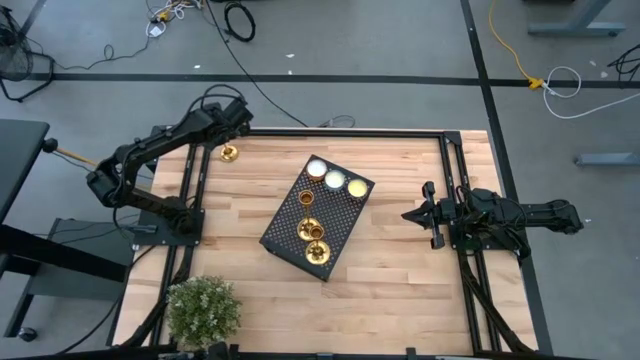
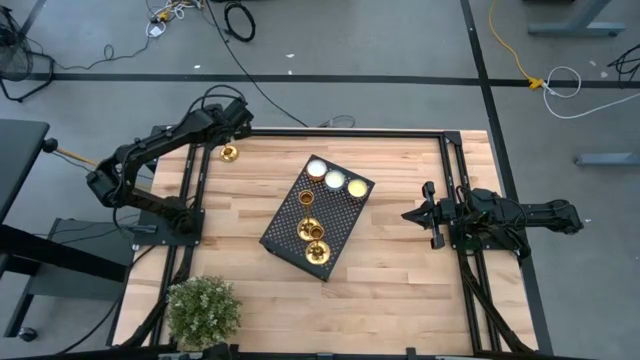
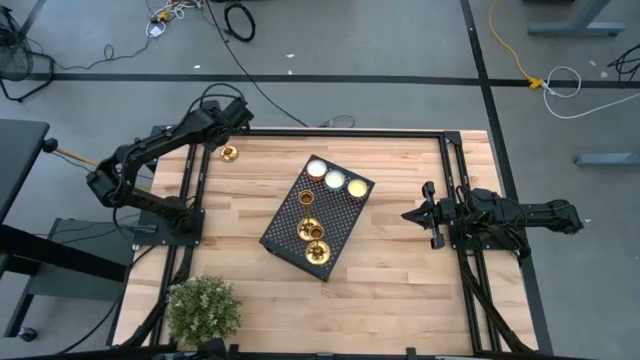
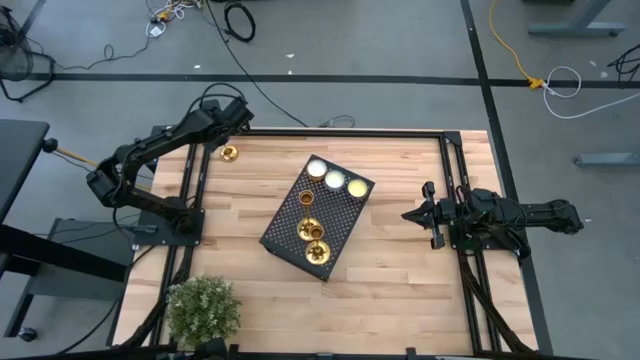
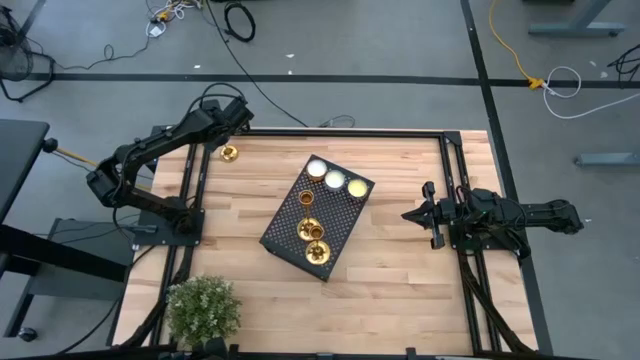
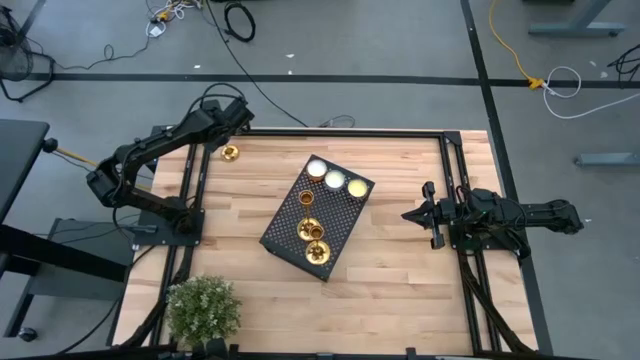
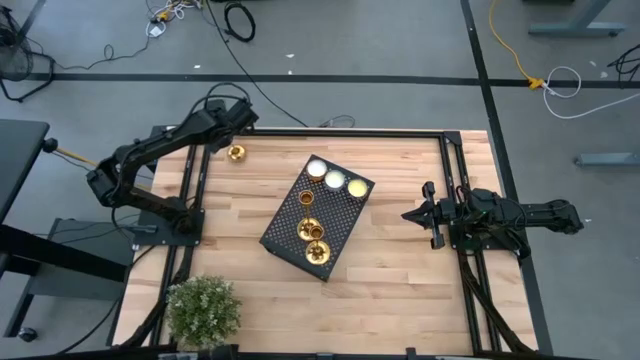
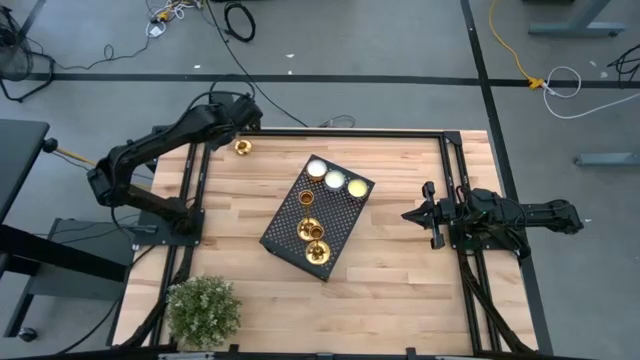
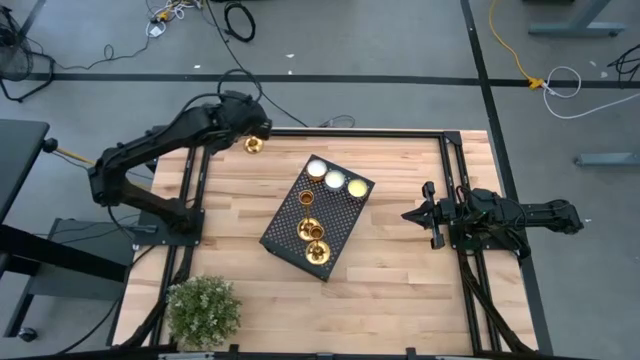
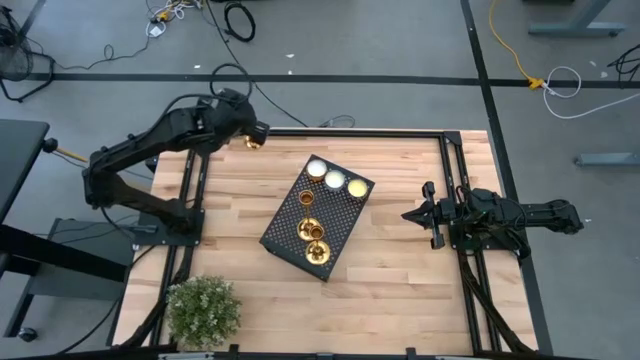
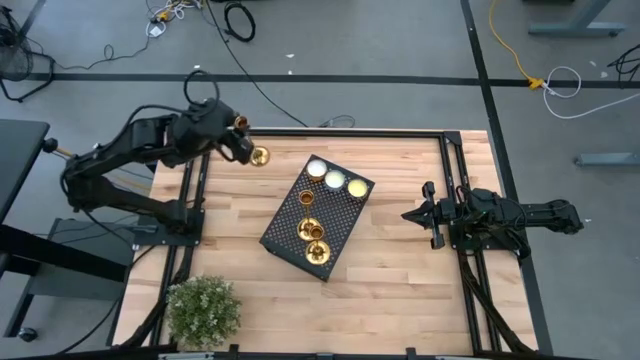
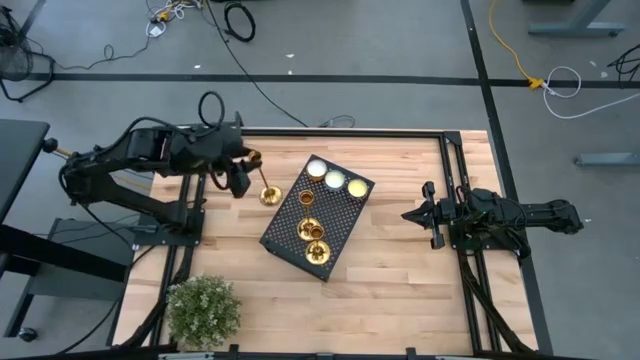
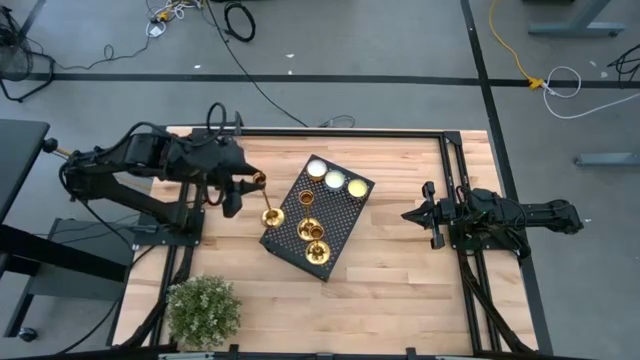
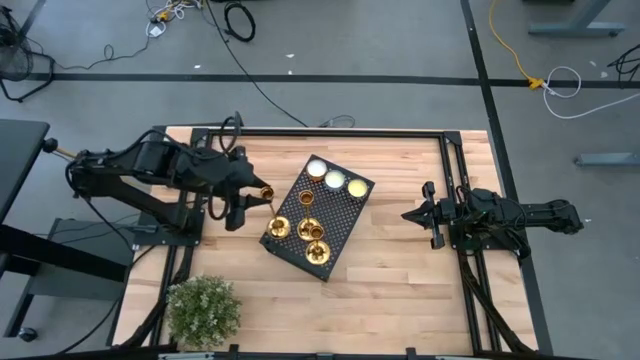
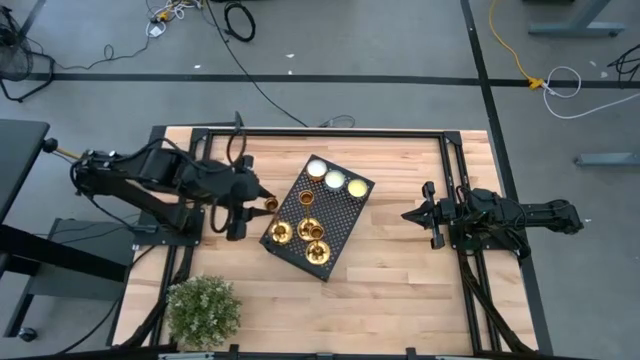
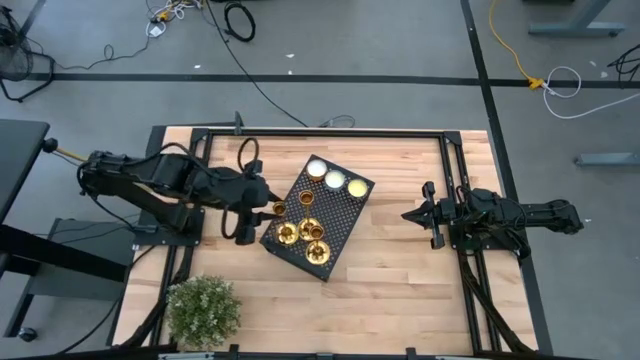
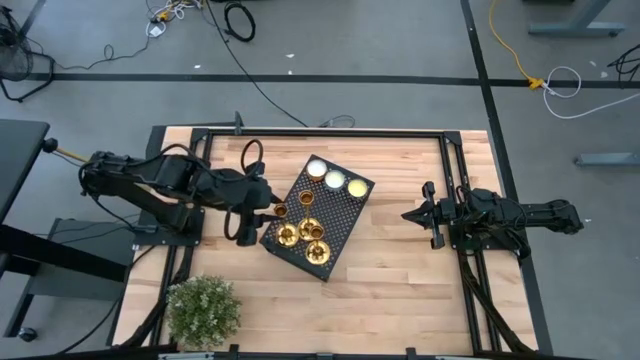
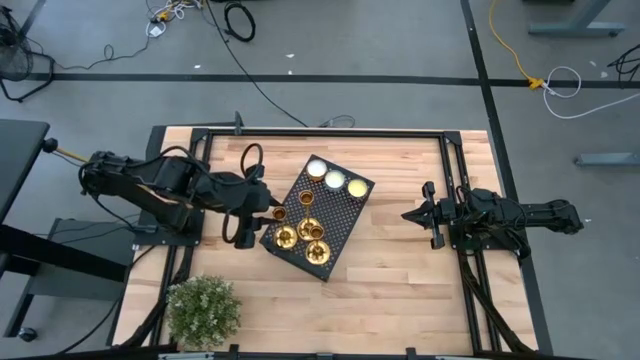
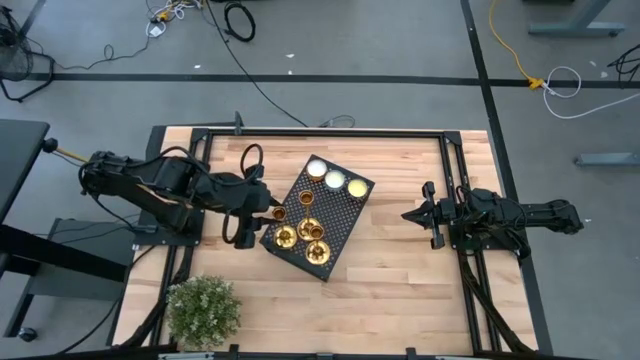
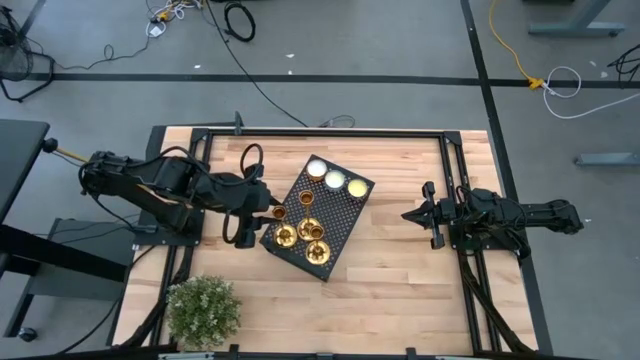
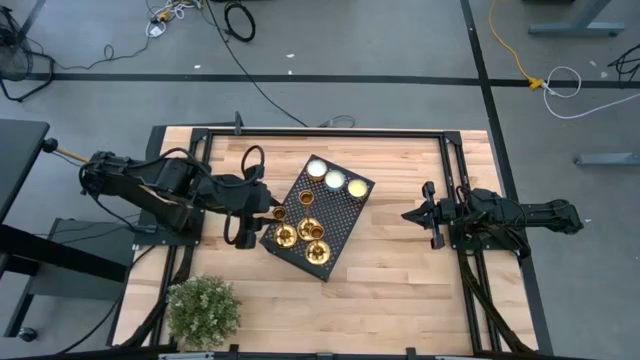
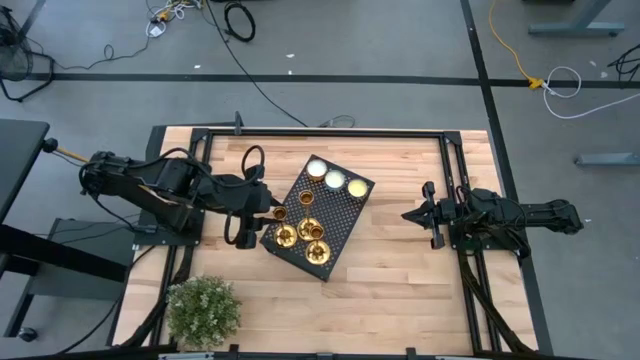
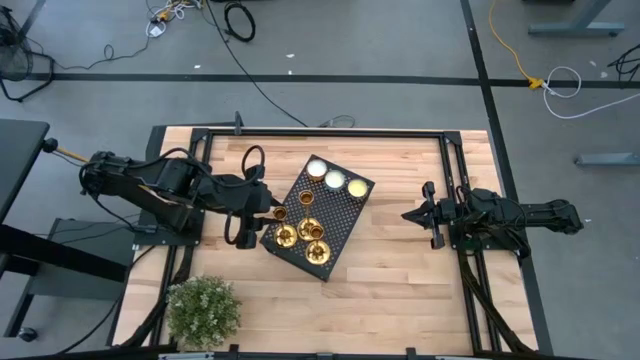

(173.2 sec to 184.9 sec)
Task: Stock candles on shelf
Put the gold candle holder on the shelf

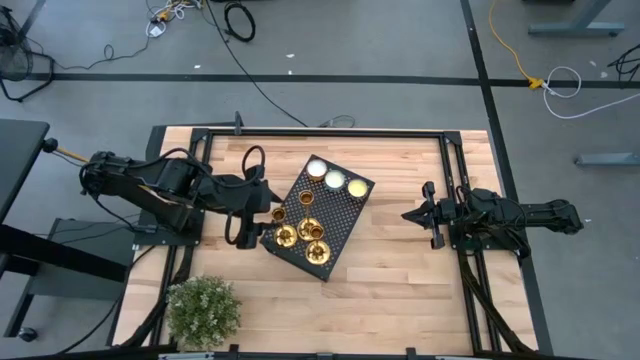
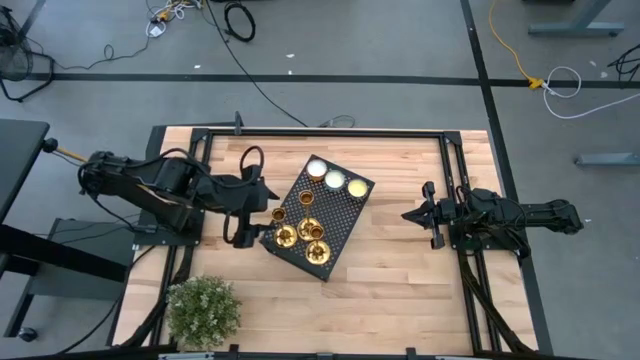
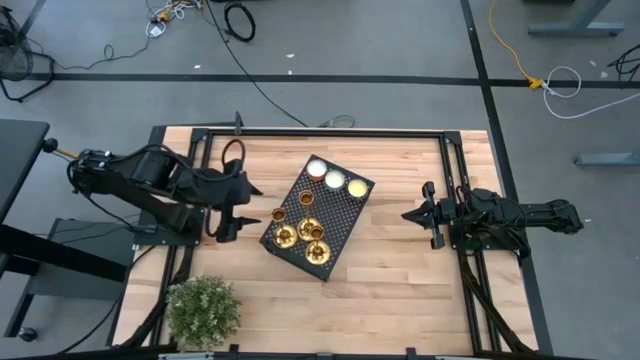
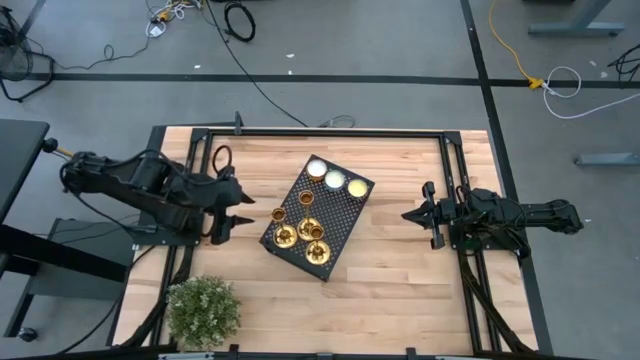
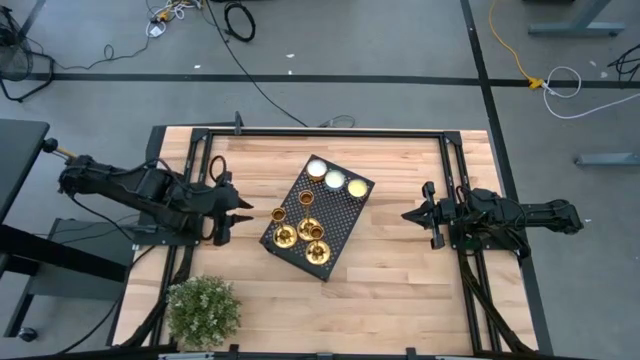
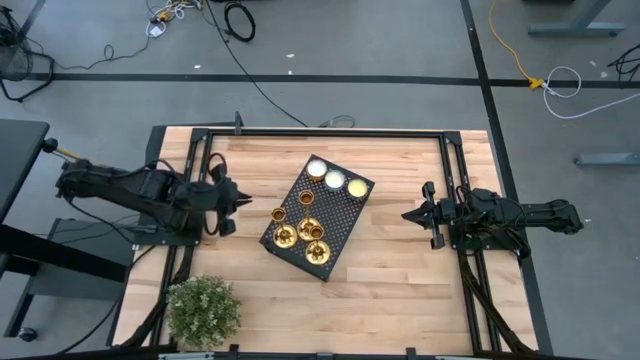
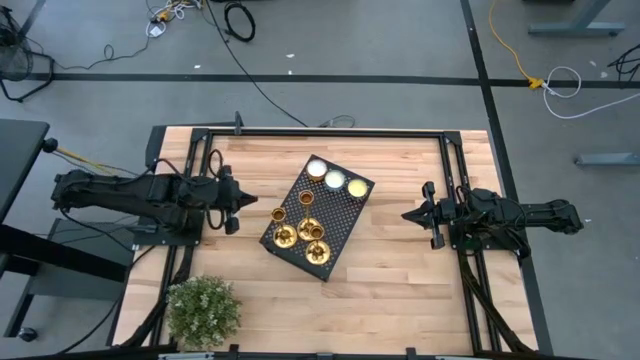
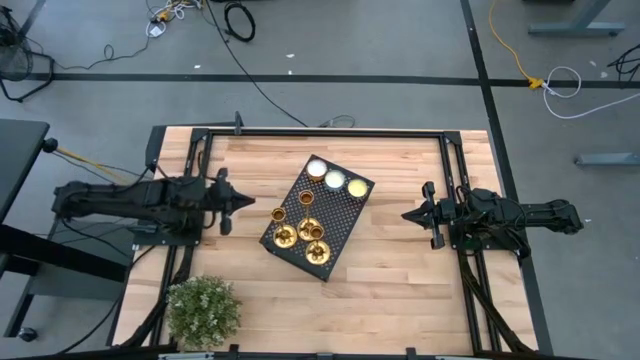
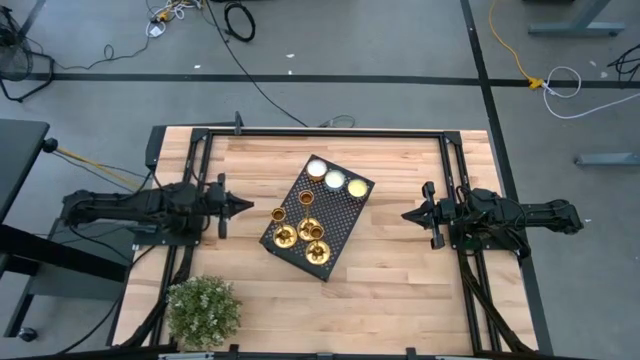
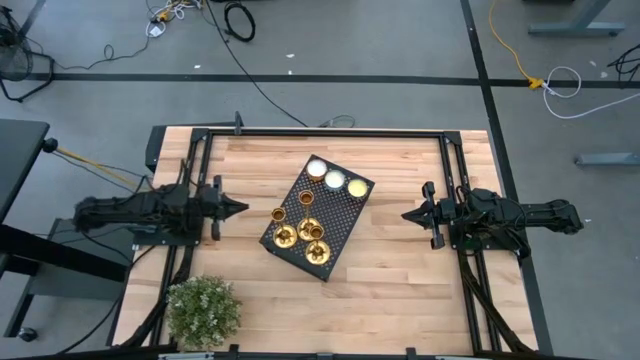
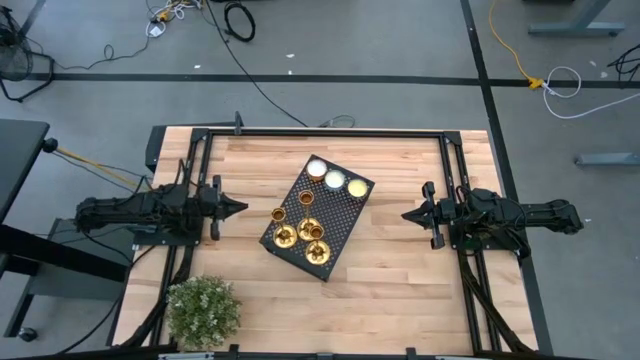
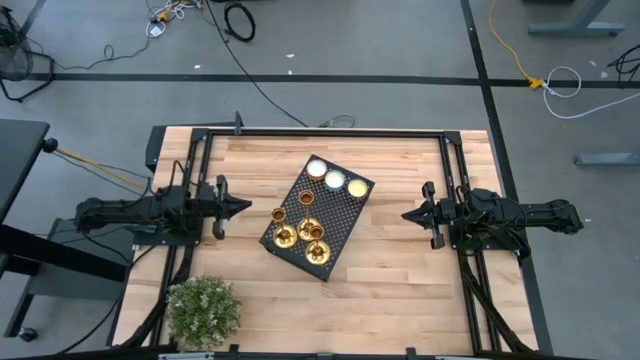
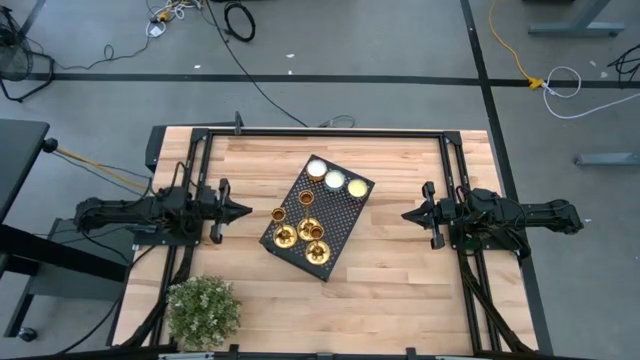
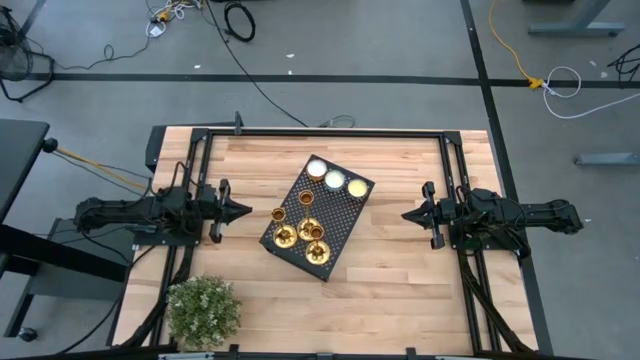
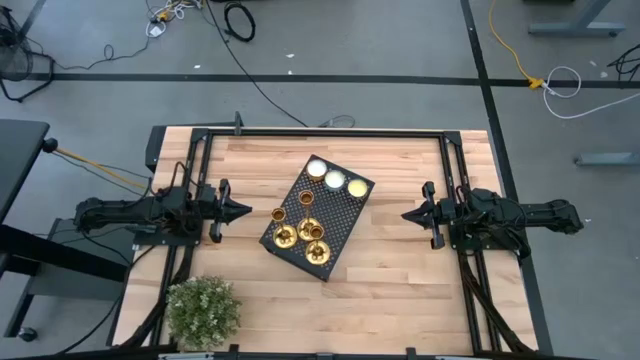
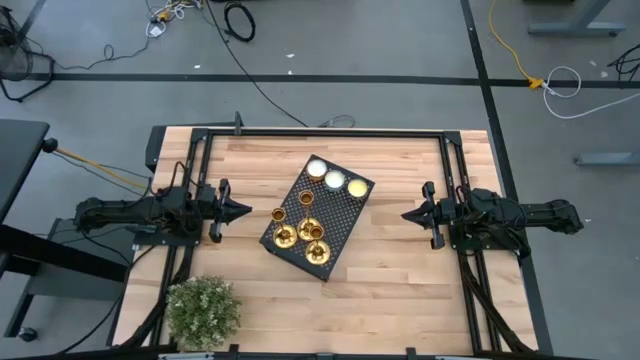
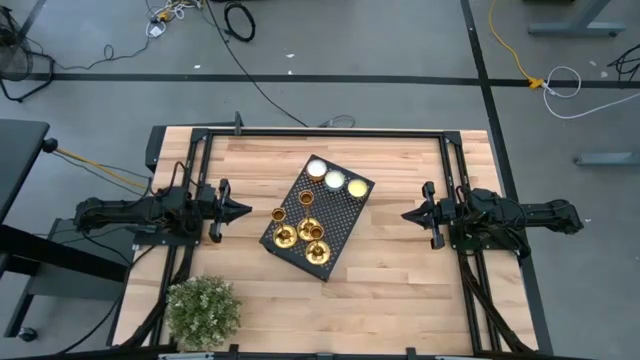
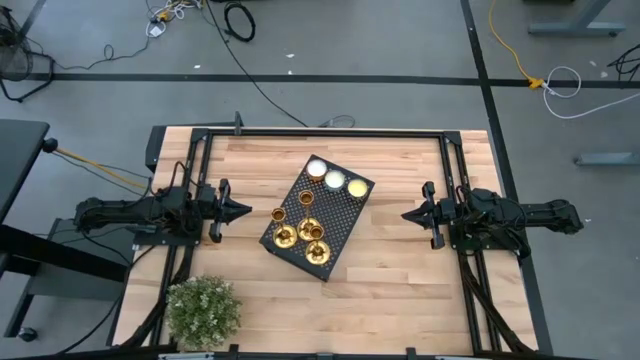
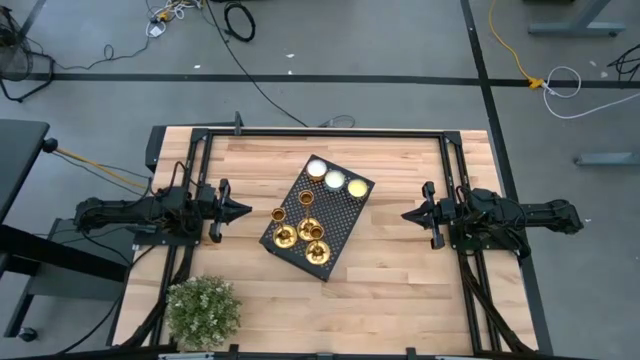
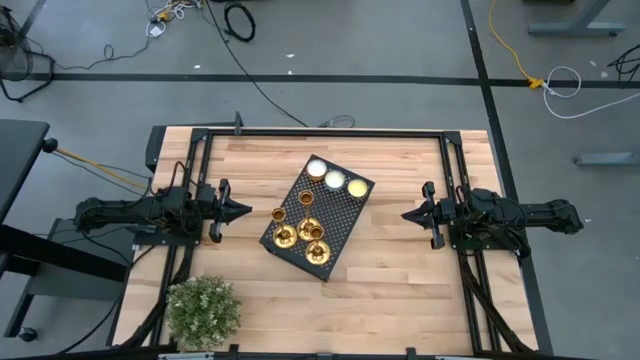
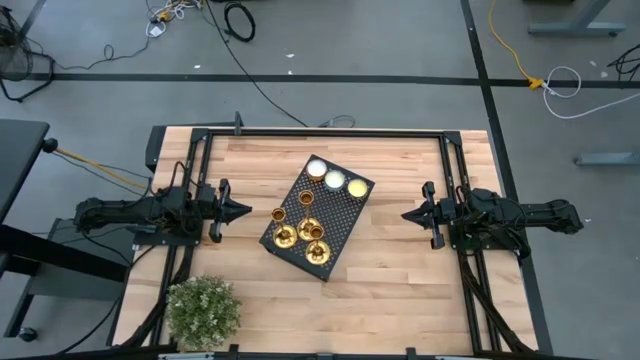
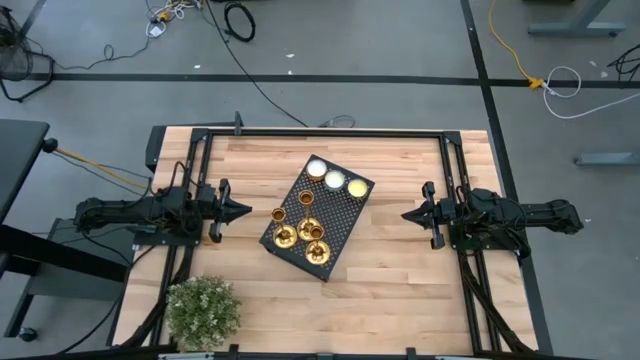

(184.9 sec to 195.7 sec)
Return to Home Position
